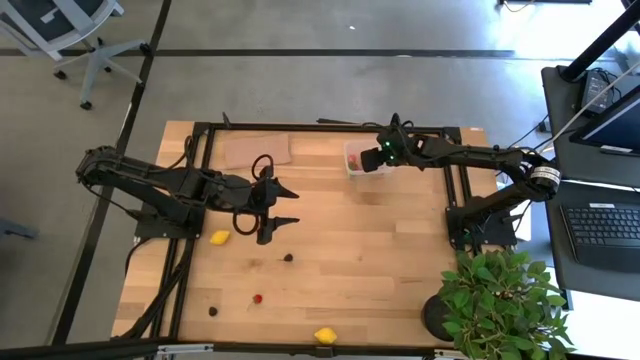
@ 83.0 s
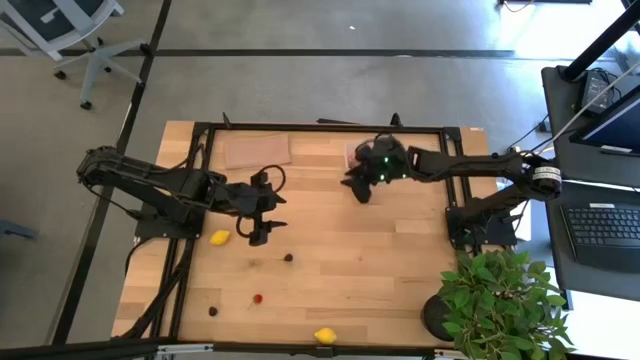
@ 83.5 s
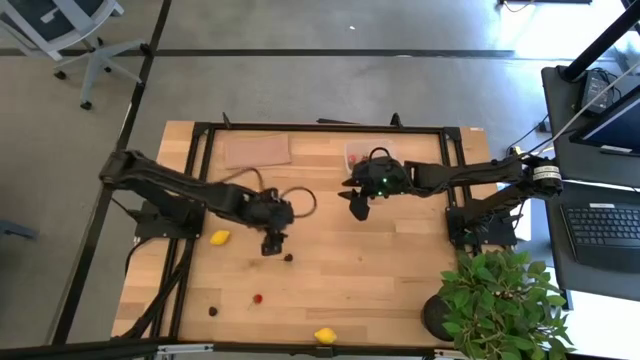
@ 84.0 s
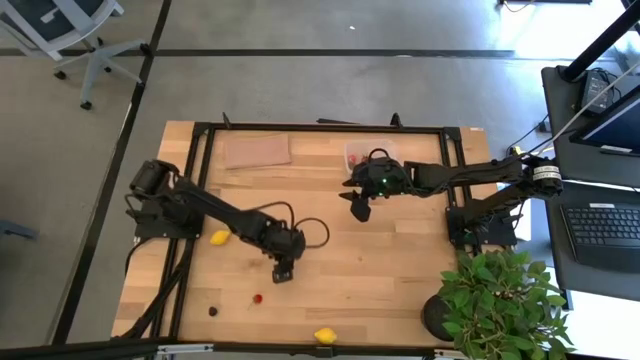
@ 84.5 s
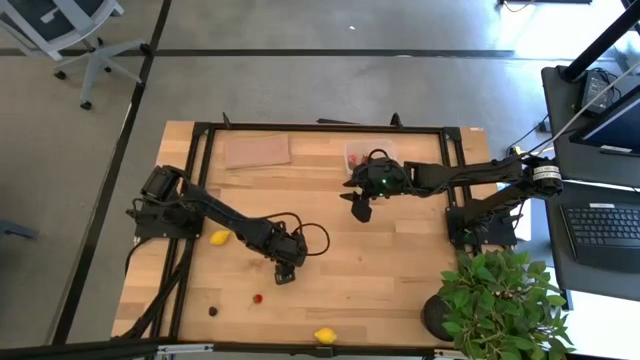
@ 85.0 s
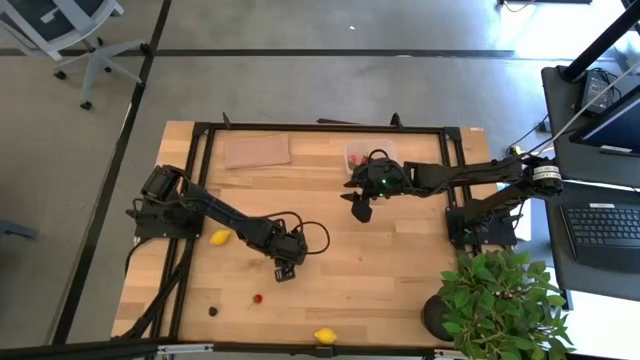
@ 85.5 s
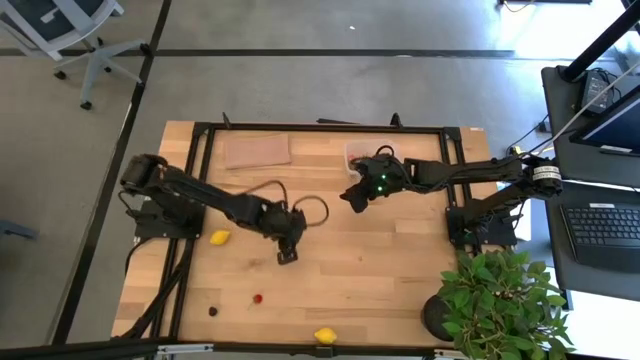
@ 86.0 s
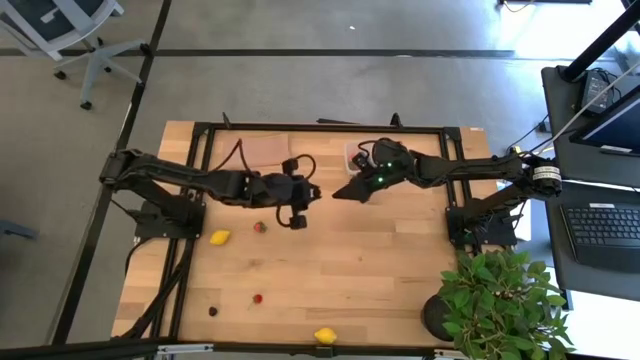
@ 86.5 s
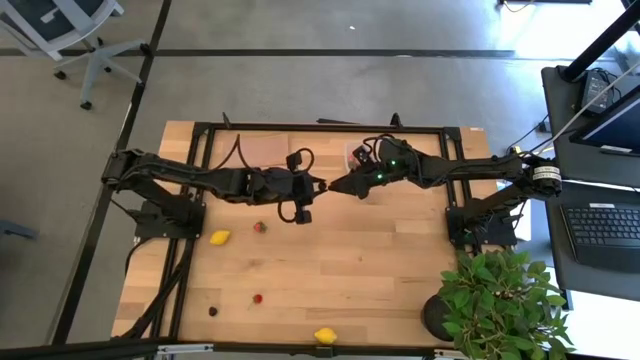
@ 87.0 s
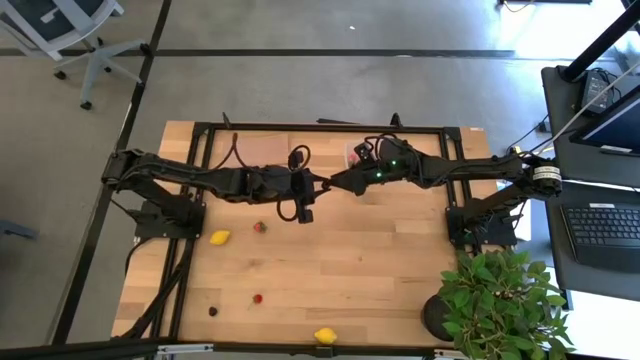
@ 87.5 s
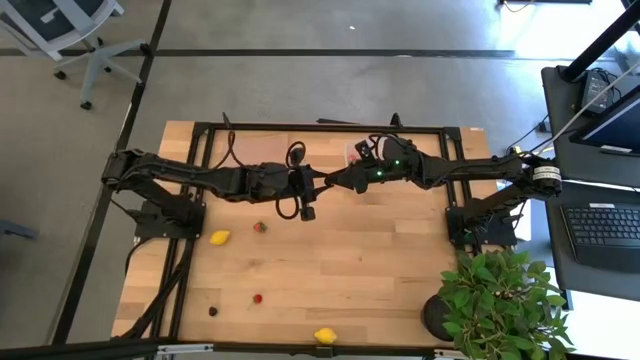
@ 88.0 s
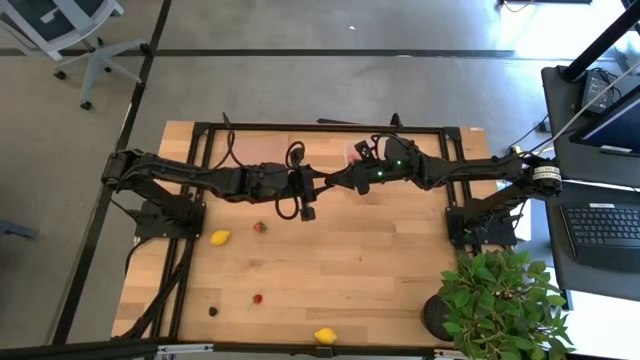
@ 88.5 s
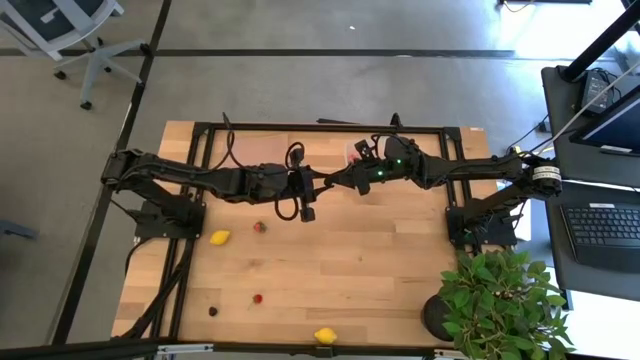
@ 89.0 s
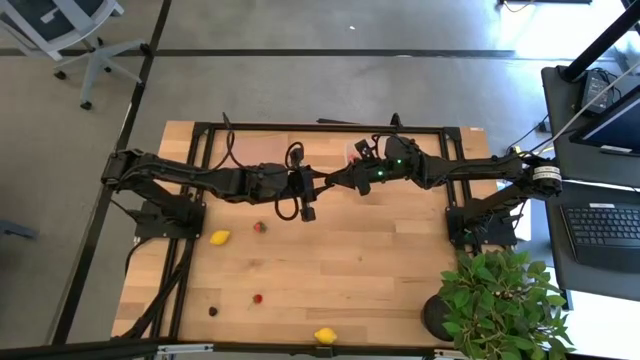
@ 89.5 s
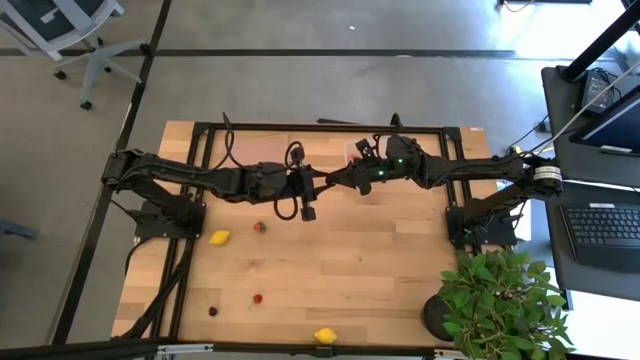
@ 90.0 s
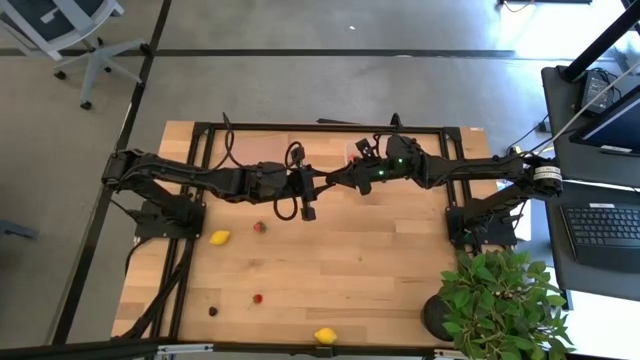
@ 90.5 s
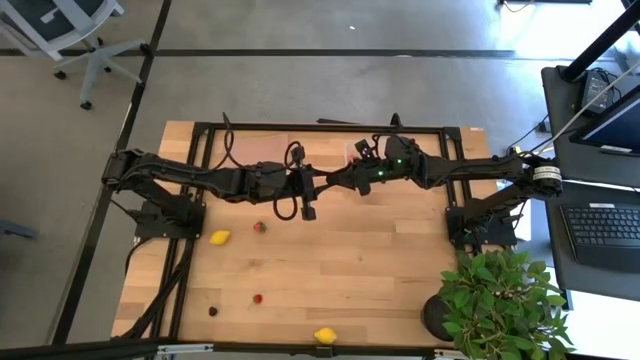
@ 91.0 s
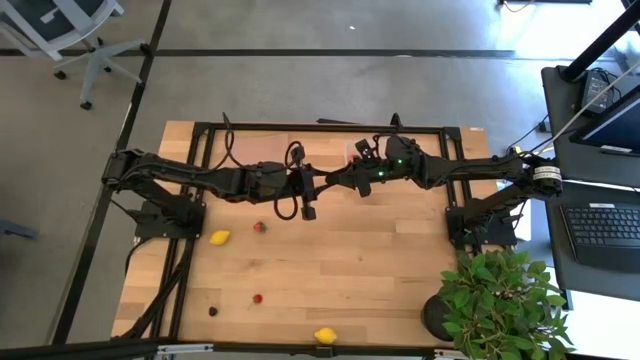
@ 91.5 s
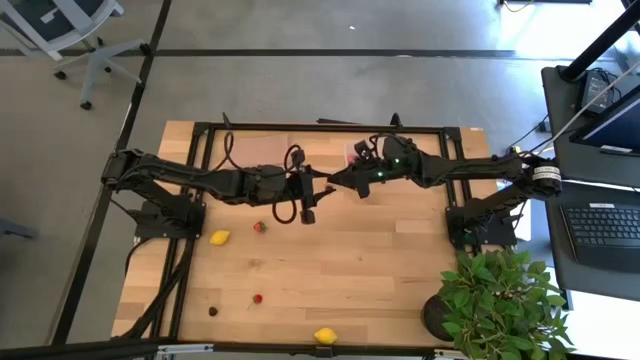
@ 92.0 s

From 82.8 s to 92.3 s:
Task: Pick and placing Produce into tupperware
Put the blackberry into the transparent bin

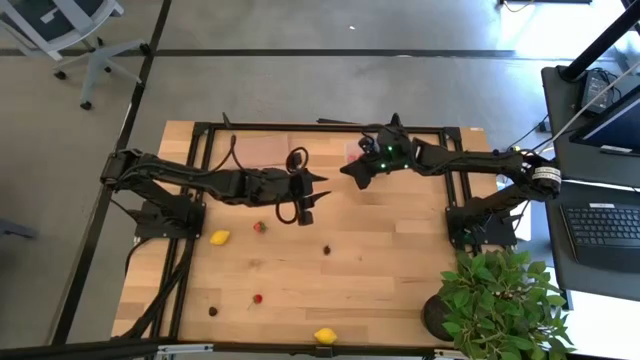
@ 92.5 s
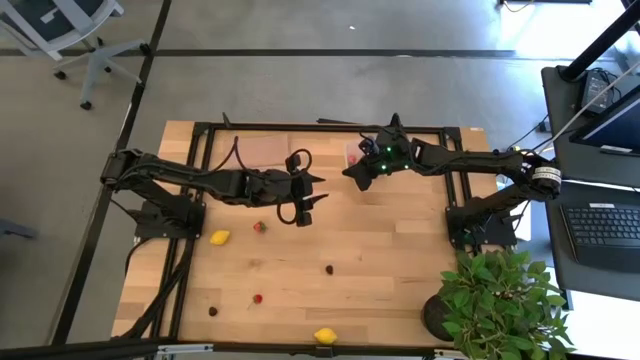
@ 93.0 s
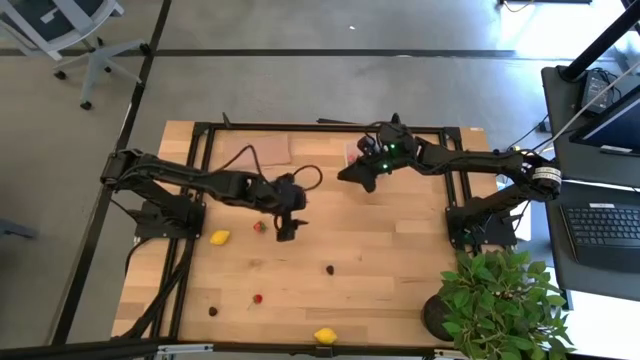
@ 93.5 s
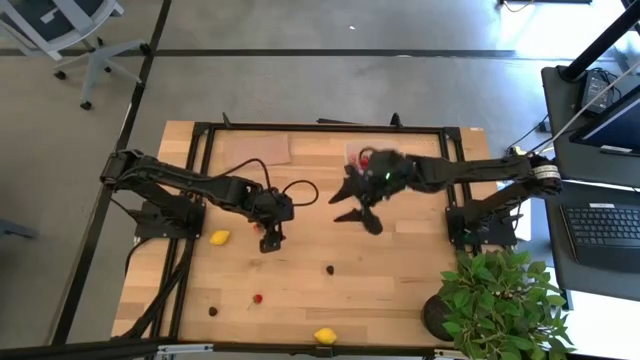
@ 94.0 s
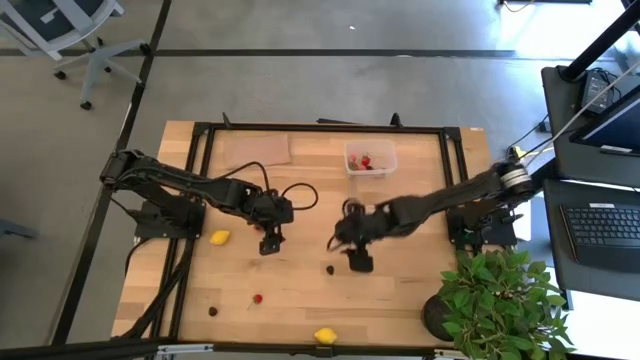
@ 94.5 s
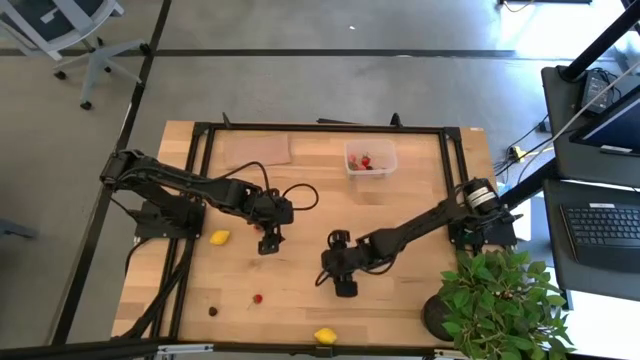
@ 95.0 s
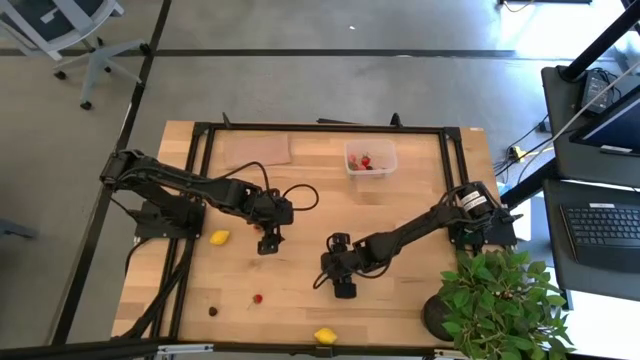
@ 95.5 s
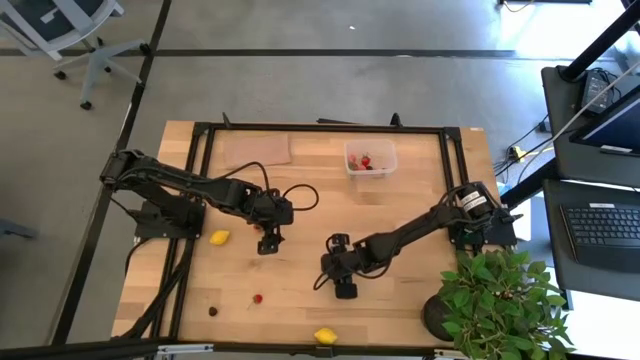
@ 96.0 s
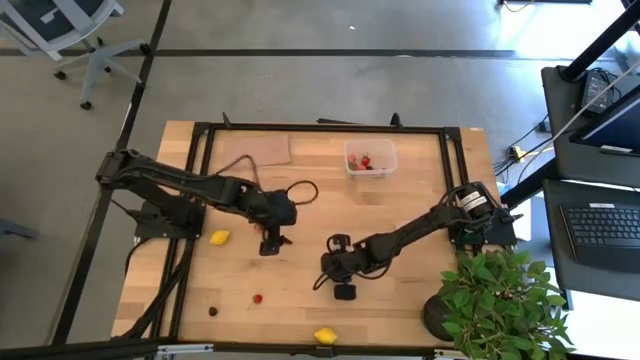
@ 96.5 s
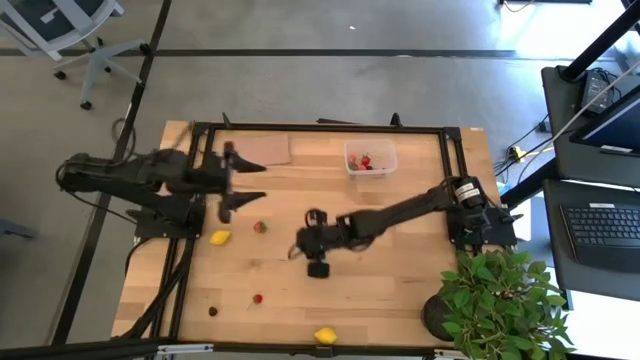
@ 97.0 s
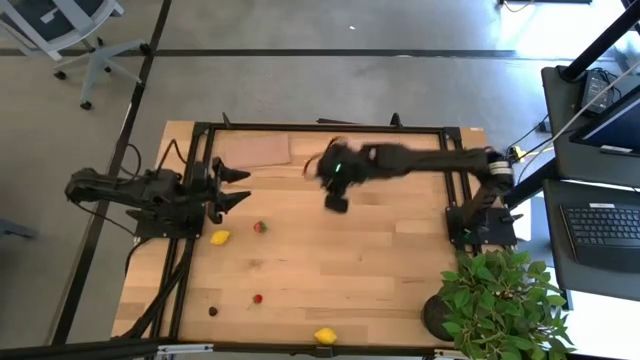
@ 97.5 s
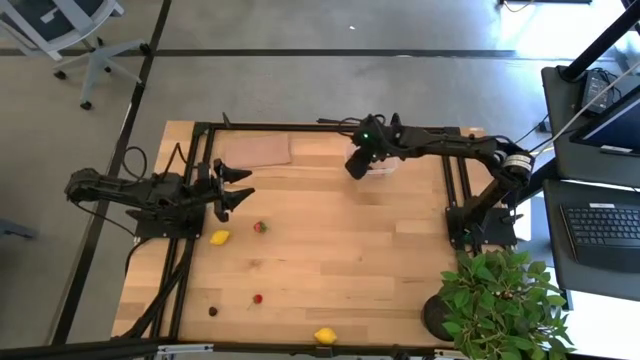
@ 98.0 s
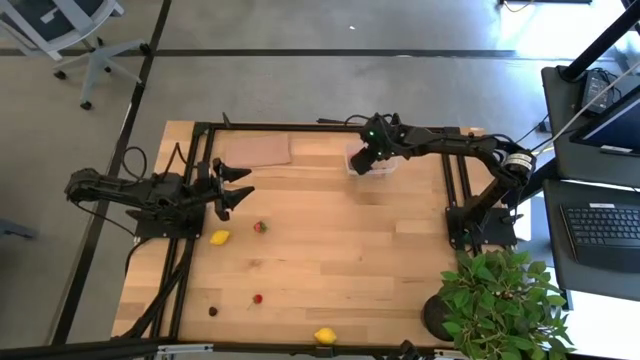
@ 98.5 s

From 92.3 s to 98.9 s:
Put the blackberry into the transparent bin

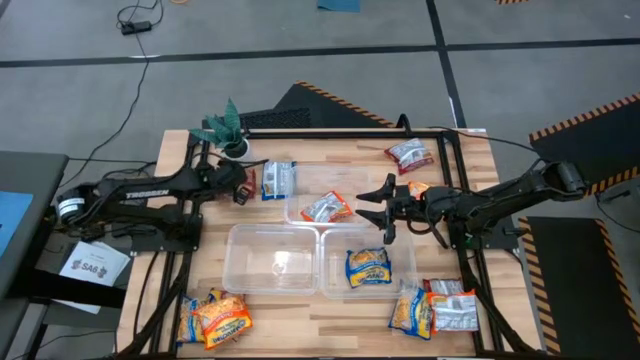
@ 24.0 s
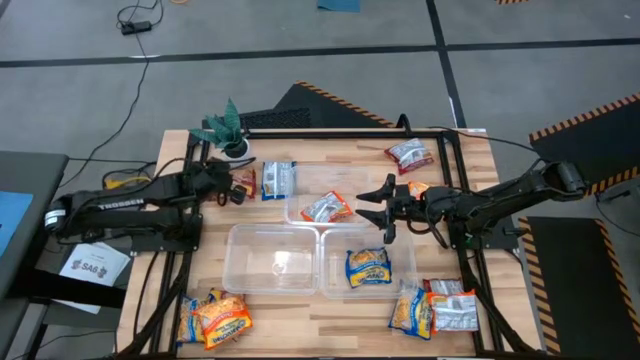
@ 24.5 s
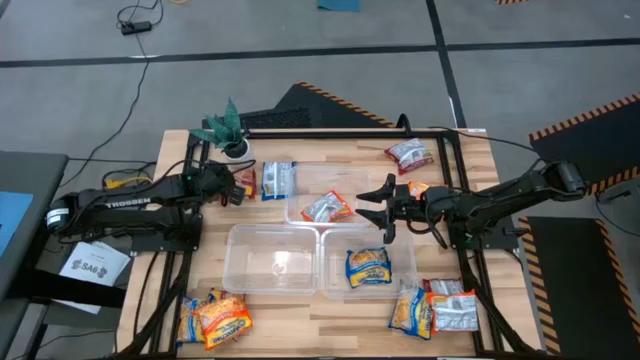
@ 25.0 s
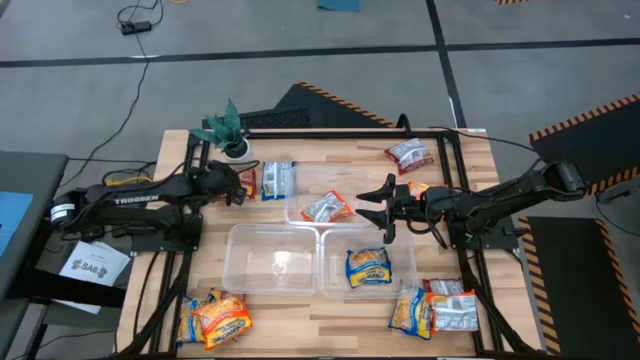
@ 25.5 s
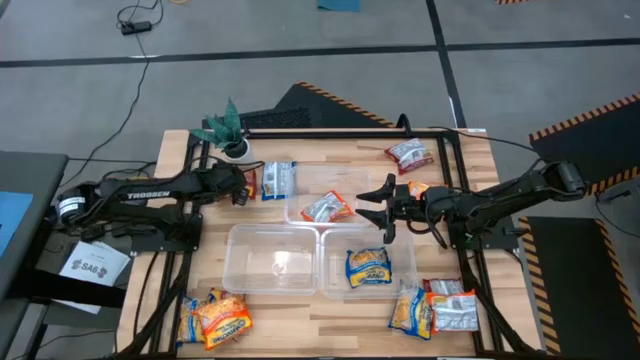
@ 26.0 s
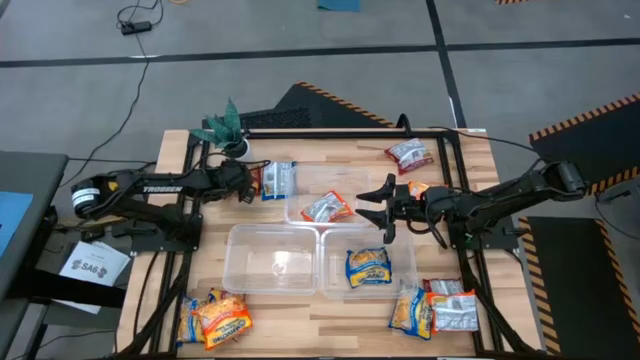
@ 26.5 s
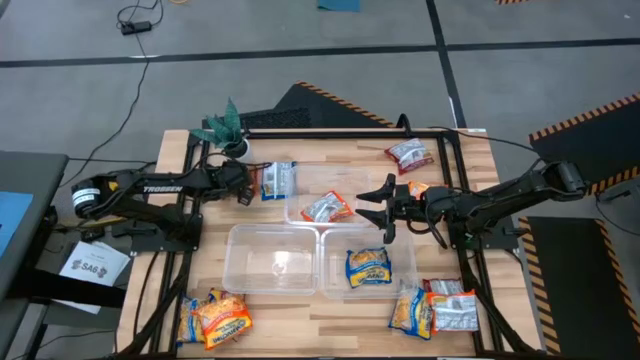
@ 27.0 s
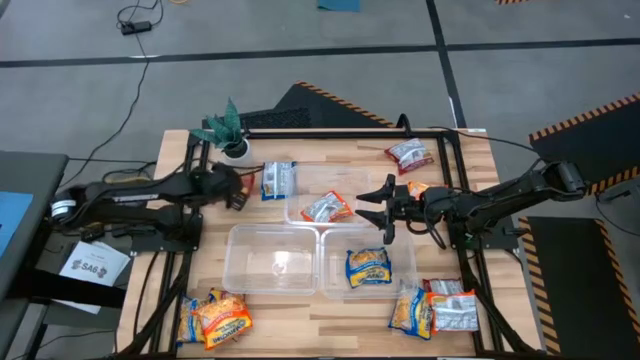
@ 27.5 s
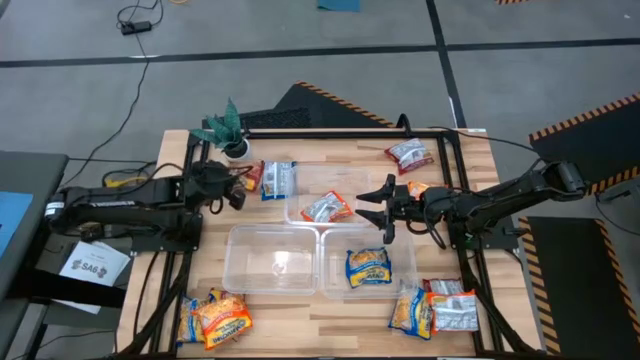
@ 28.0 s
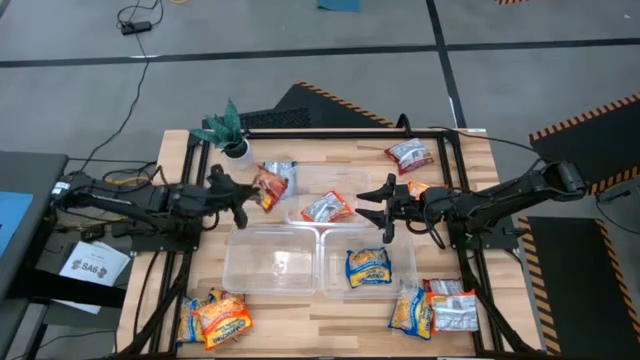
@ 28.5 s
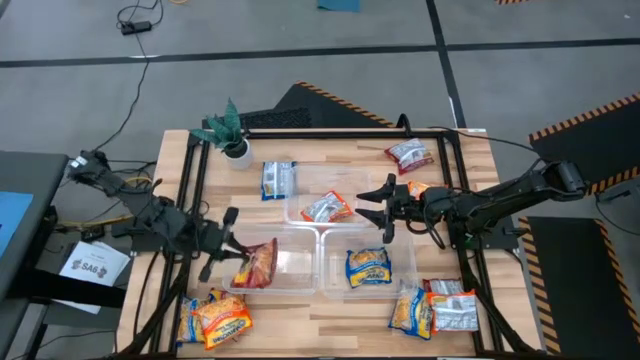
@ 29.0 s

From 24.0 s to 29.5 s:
Task: Sort Maruchan noodles
Put the red noodle pack into the bottom left transparent bin
